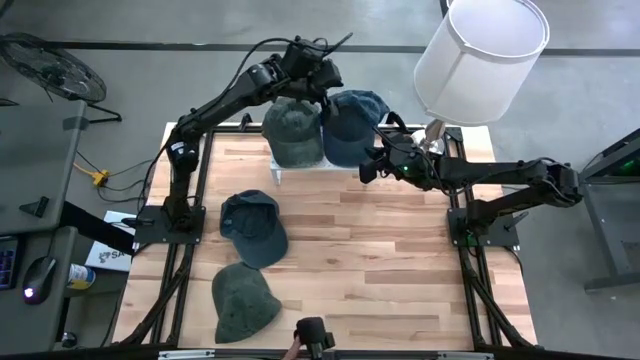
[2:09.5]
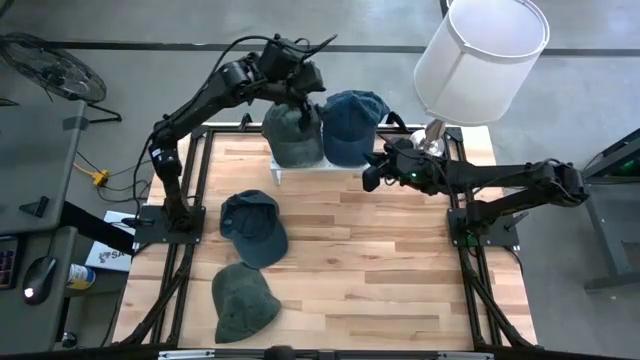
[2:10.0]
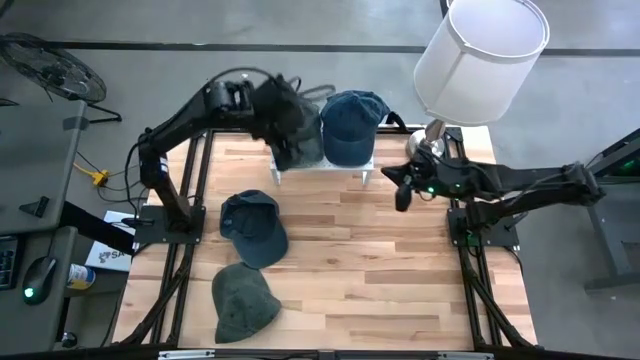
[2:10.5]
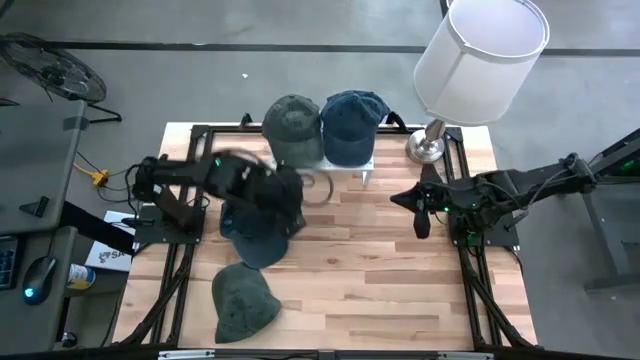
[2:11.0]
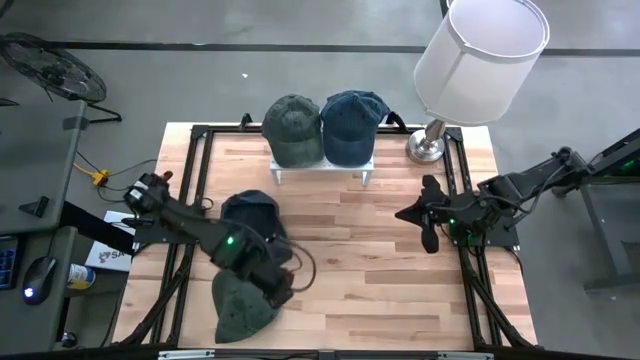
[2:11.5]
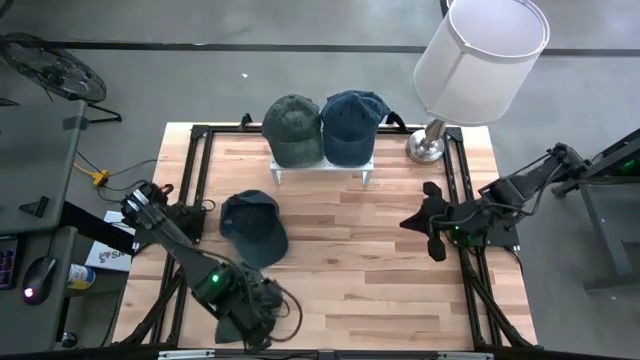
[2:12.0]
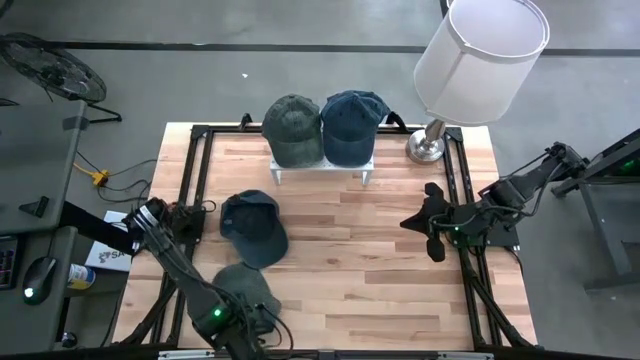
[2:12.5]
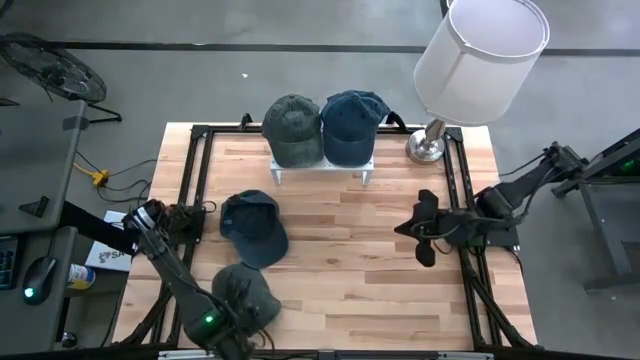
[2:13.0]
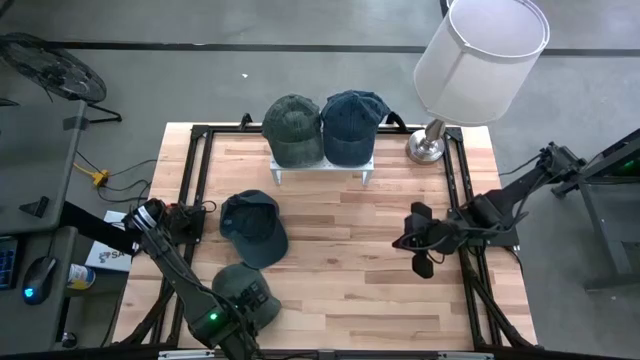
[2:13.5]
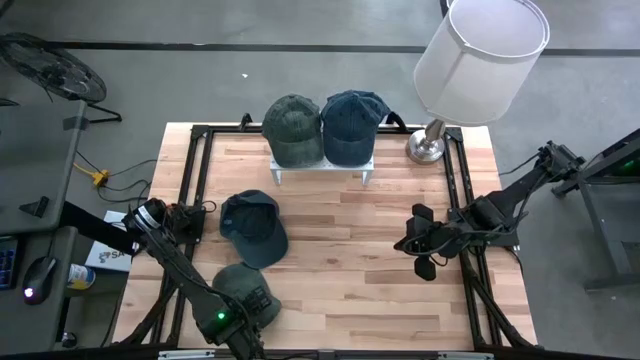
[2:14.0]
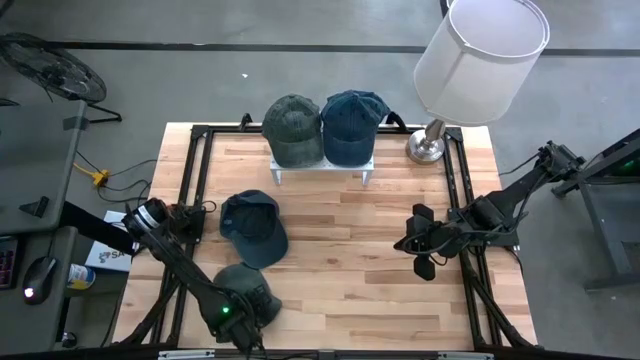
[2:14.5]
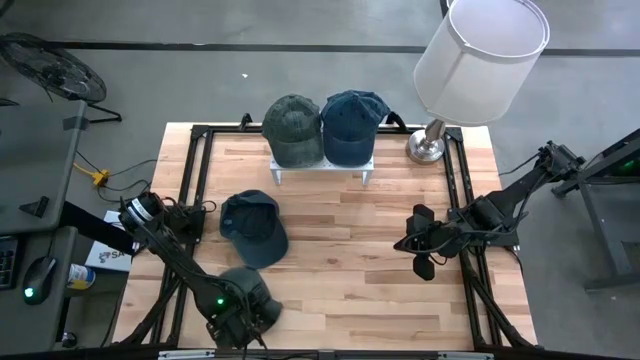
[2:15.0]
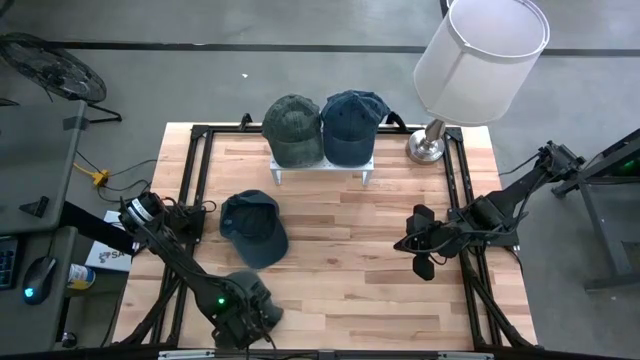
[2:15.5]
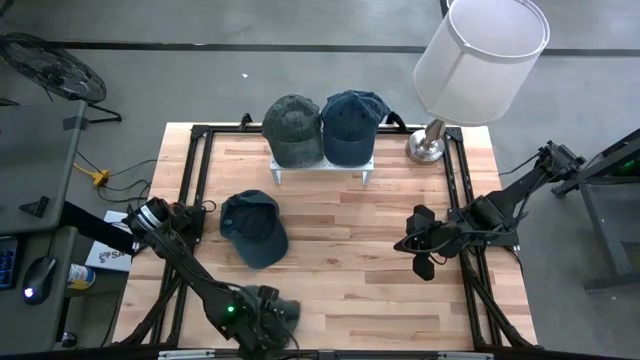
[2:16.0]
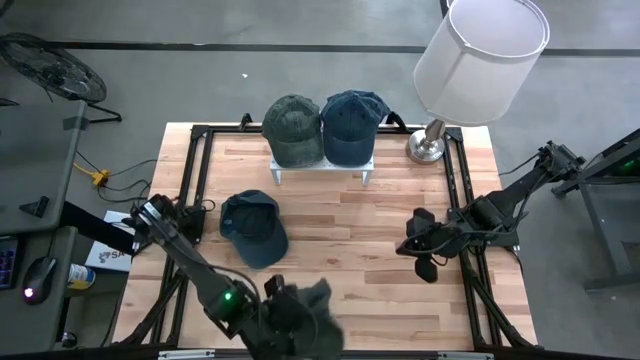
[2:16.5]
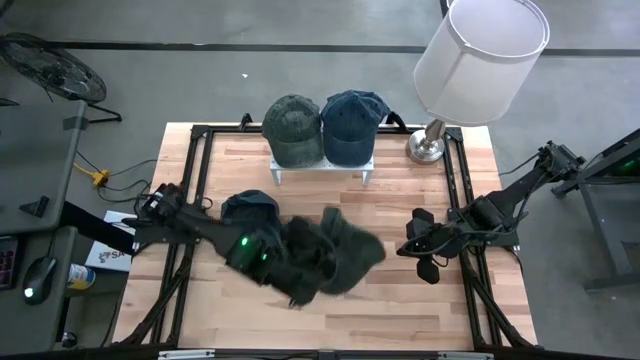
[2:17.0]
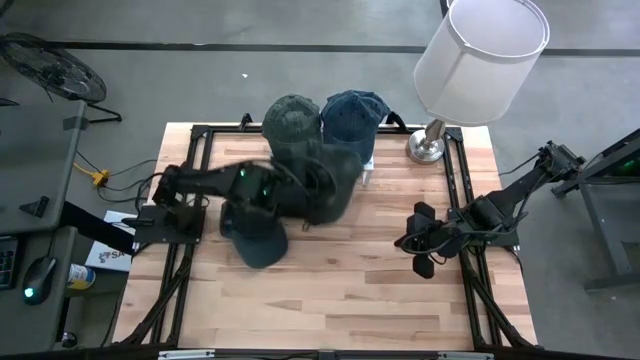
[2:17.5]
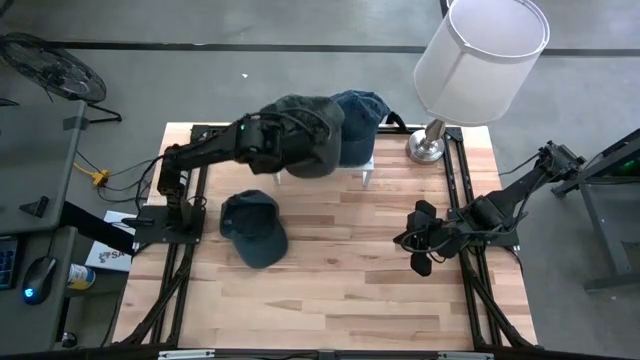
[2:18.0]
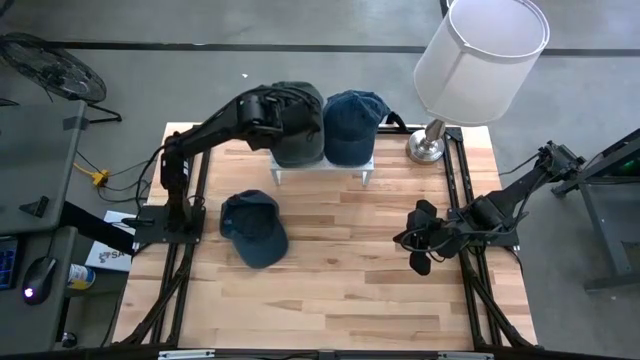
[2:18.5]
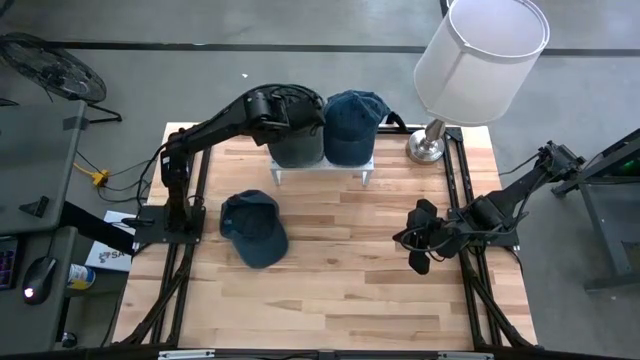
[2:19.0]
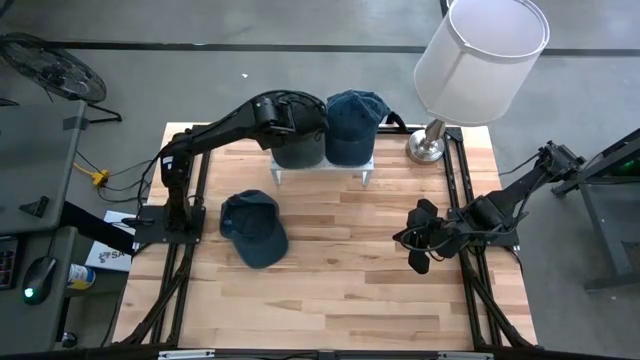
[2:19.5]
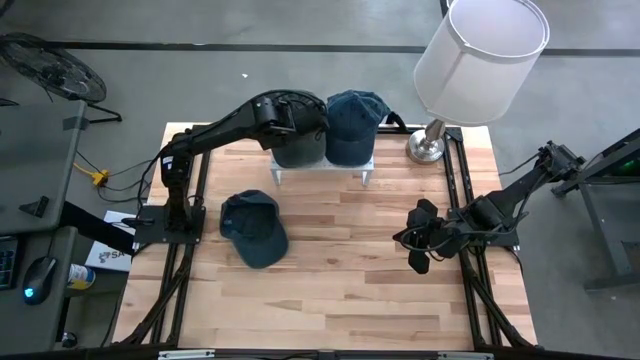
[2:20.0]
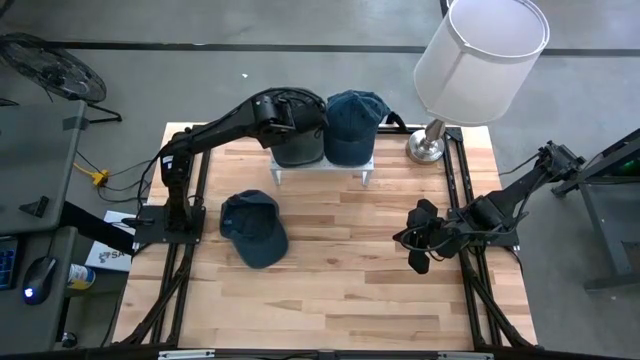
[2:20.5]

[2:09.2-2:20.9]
Task: Pick & Place hat
Stack the gray cap on top of the gray cap on the shelf

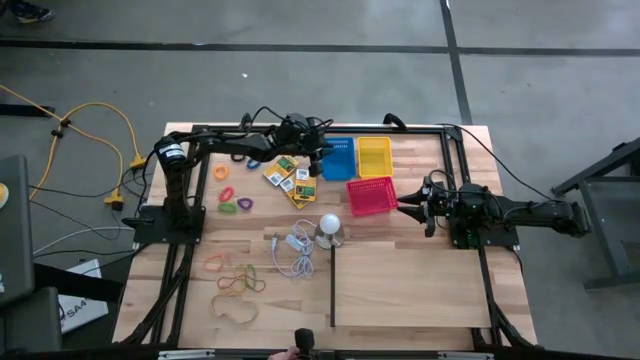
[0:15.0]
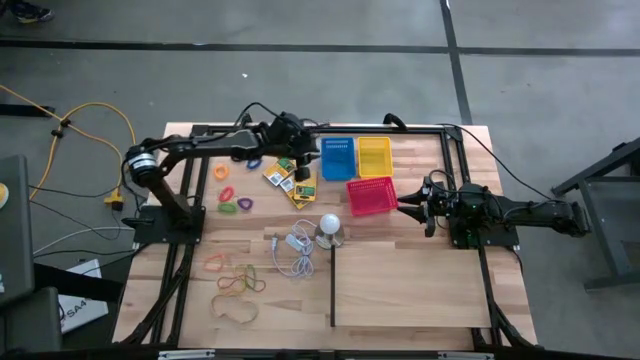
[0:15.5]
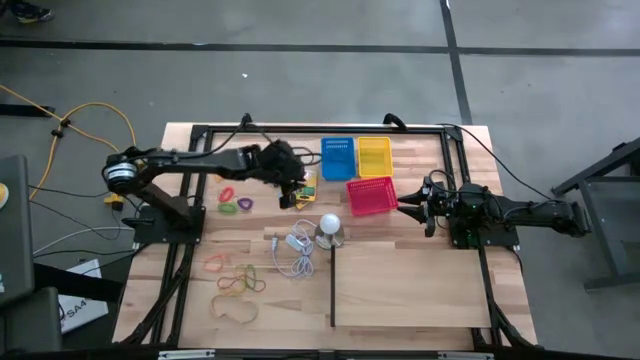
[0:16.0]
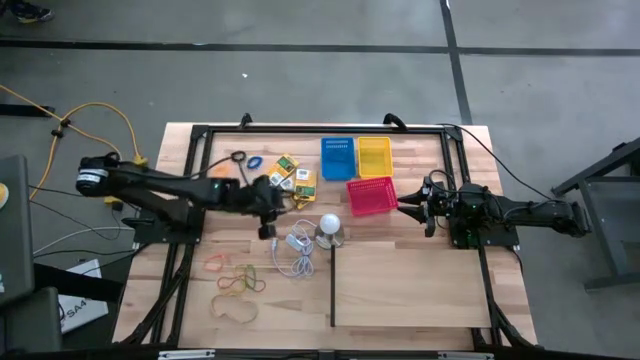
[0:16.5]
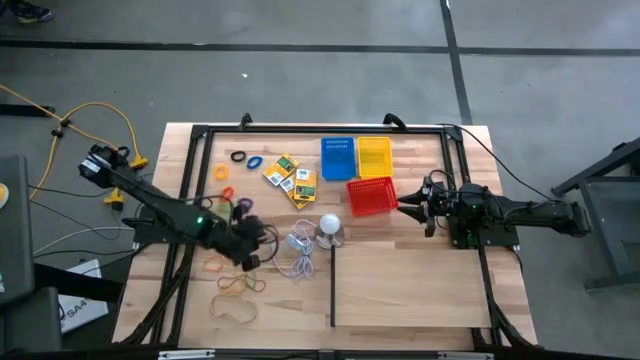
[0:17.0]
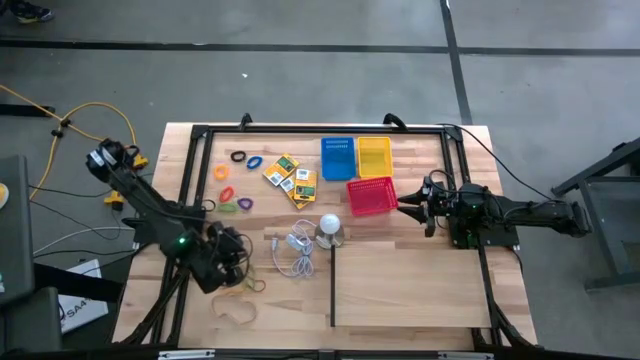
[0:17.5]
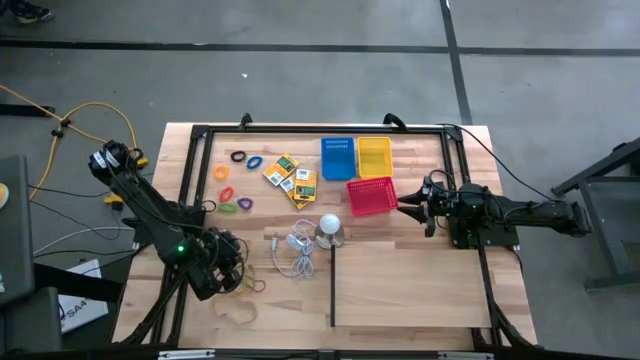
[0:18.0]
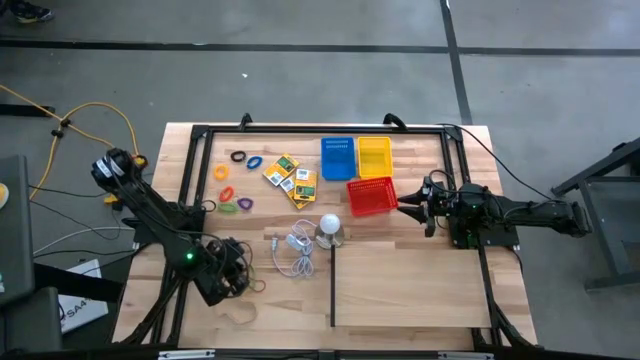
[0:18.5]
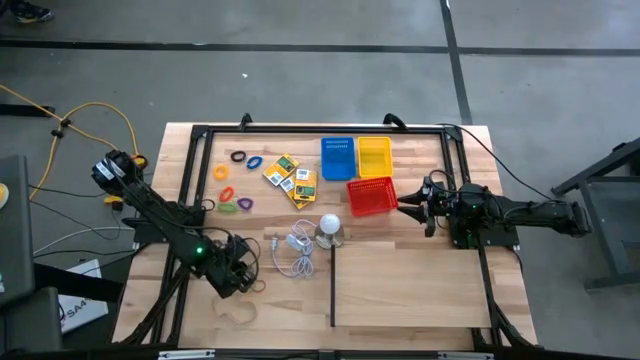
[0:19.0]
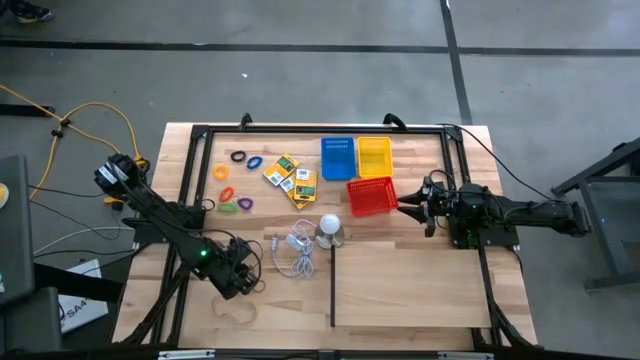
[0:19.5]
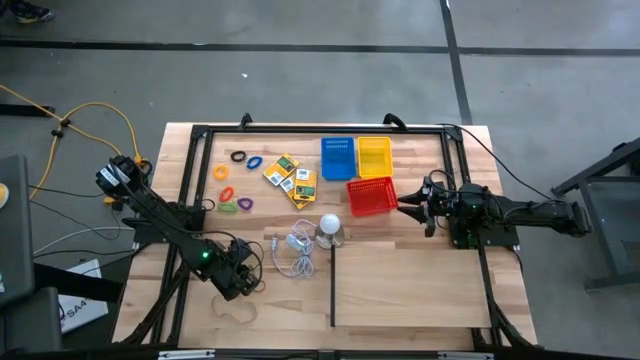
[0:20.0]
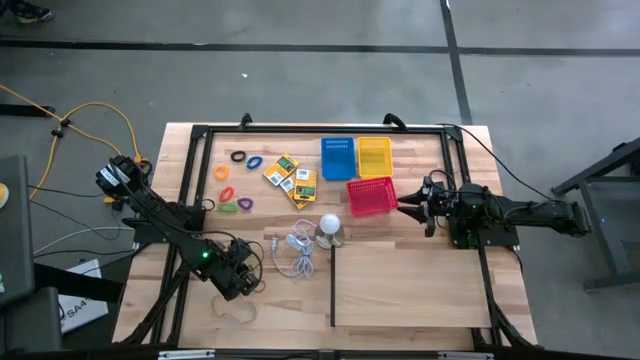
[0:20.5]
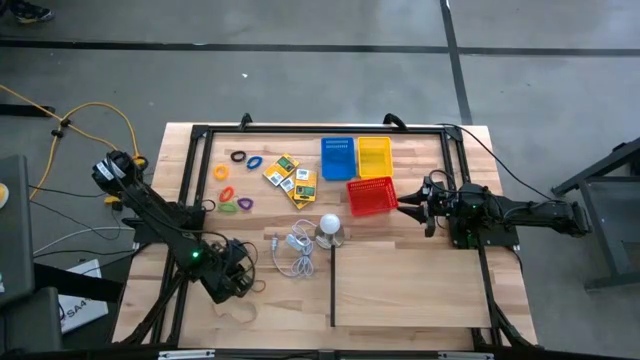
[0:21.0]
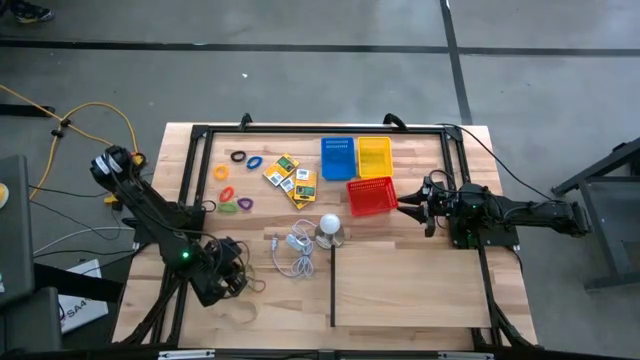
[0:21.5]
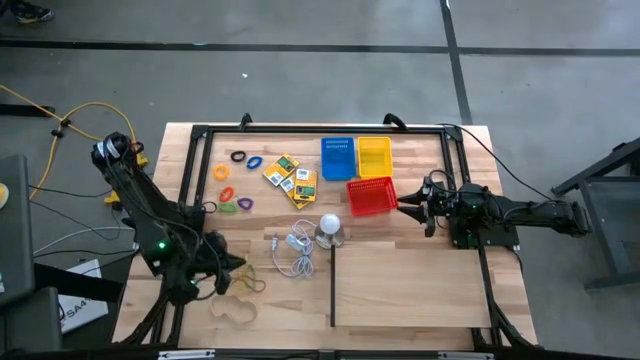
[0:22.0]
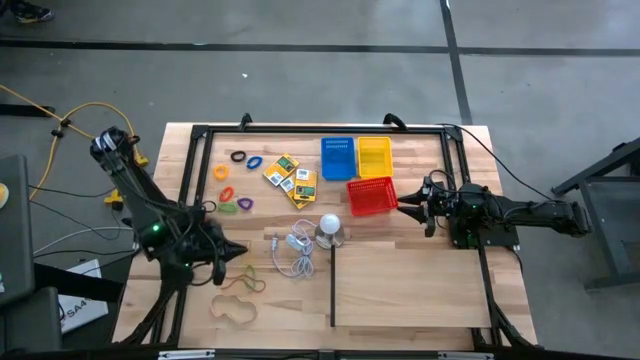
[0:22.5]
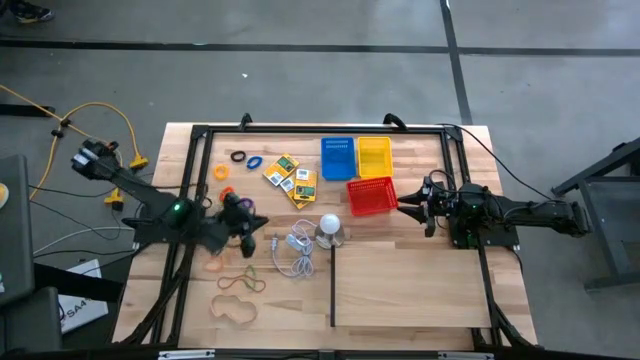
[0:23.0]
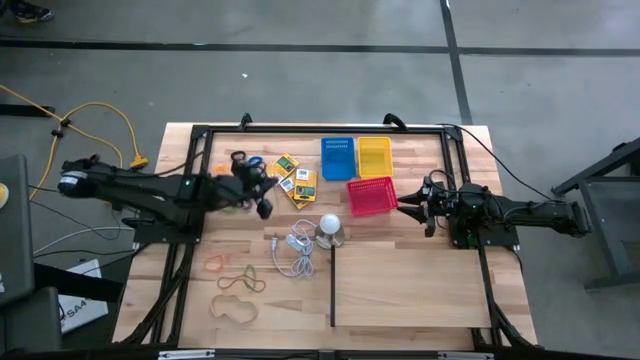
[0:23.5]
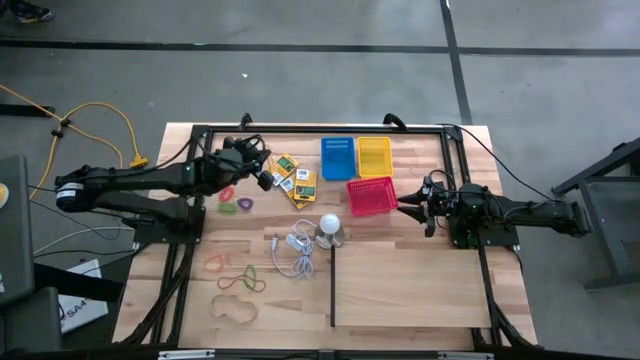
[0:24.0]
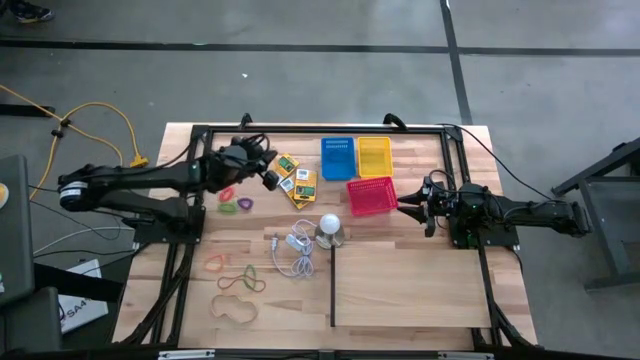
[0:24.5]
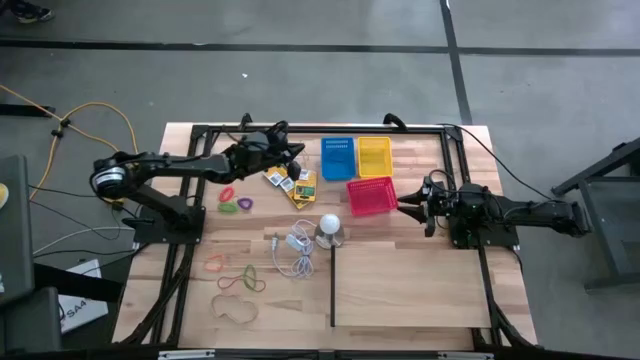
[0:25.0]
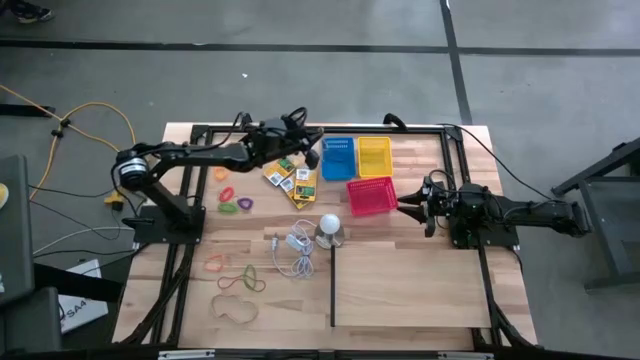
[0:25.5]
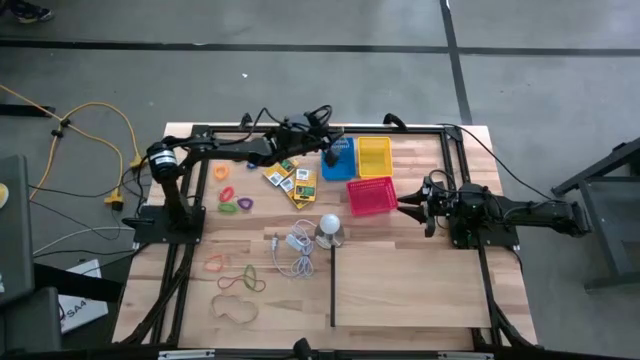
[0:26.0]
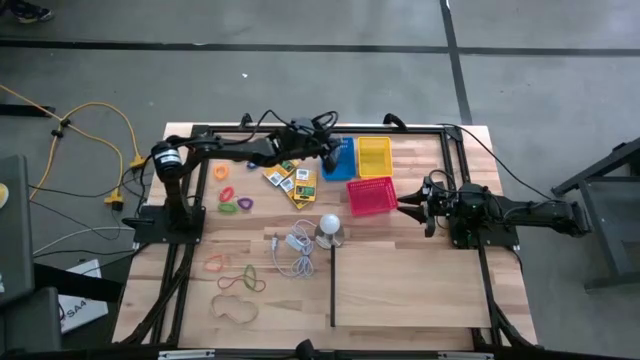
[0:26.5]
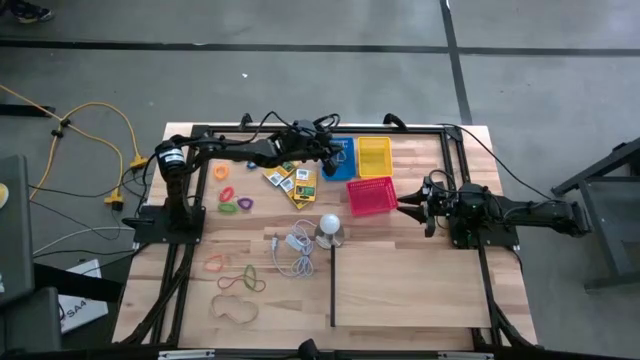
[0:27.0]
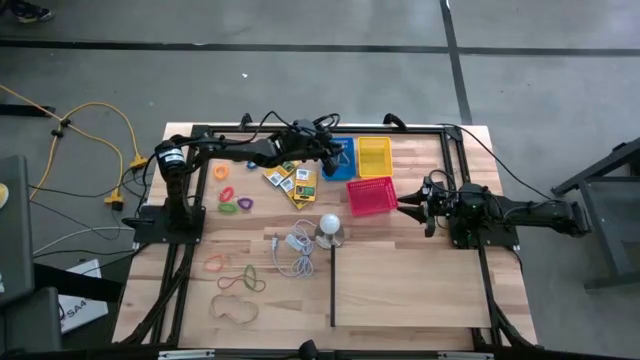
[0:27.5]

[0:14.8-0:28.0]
Task: Pick & Place Office Desk Supplies
Put the yellow rubber band into the blue bin
